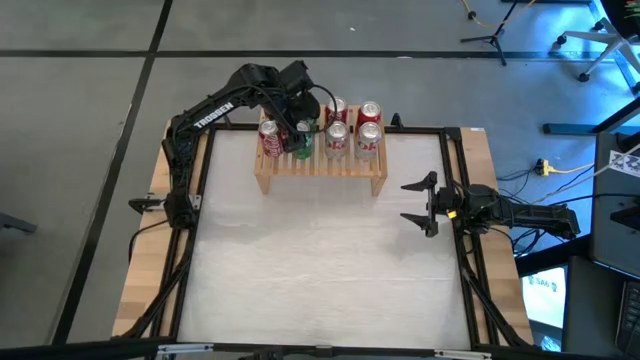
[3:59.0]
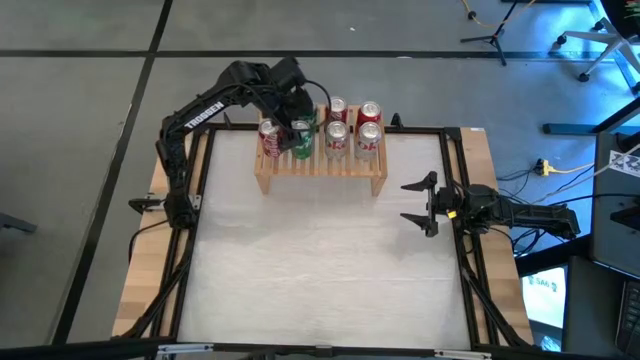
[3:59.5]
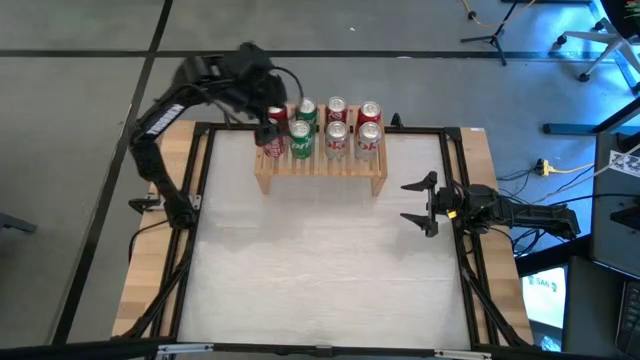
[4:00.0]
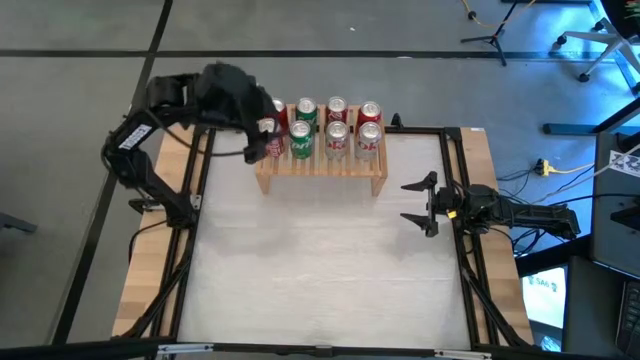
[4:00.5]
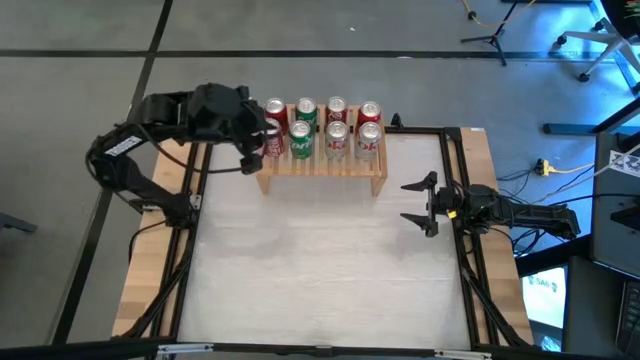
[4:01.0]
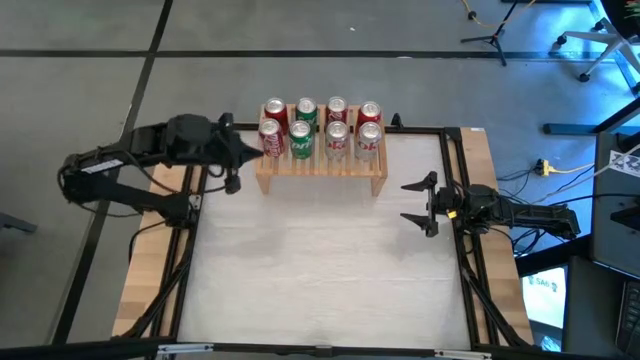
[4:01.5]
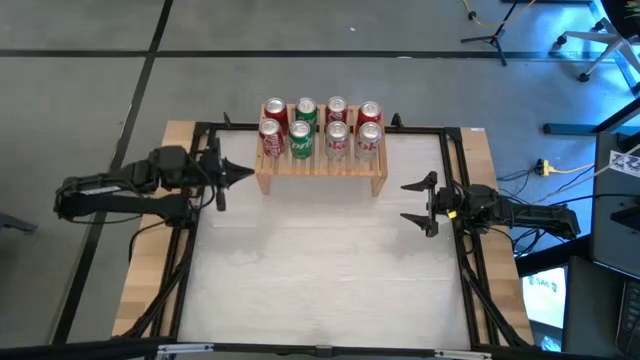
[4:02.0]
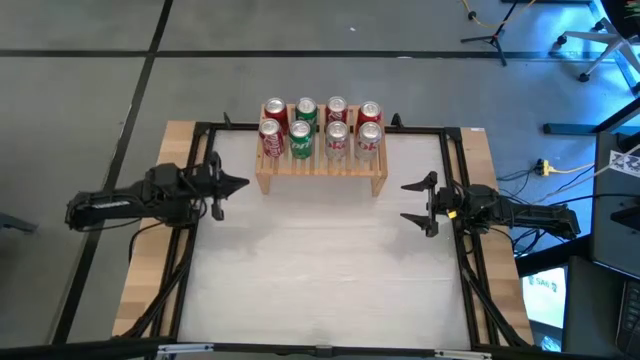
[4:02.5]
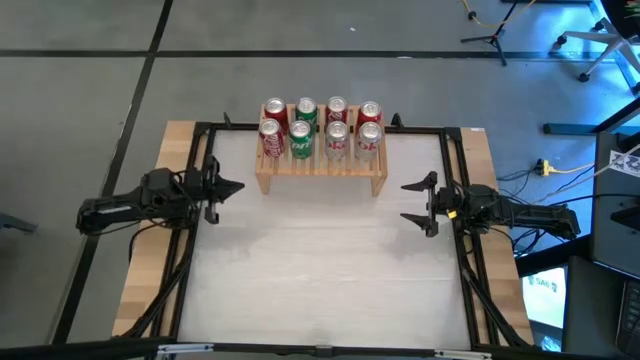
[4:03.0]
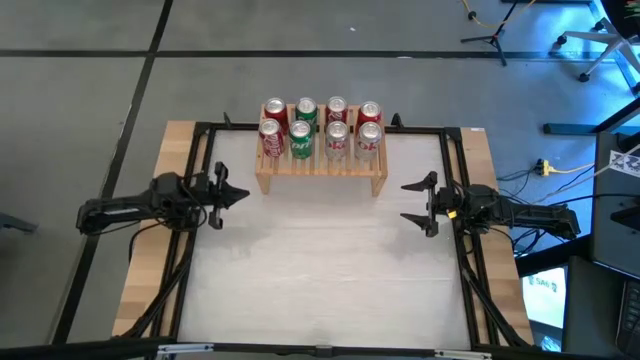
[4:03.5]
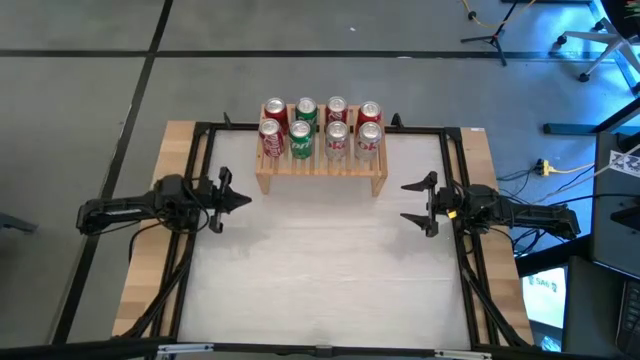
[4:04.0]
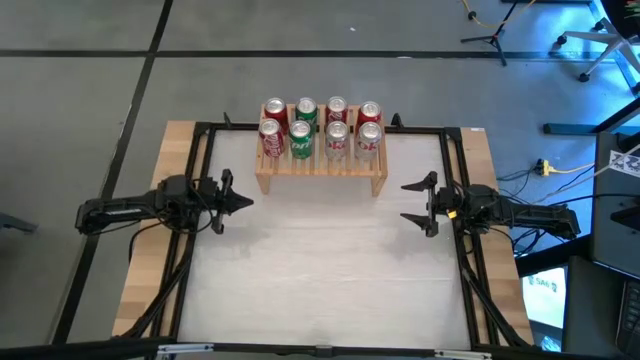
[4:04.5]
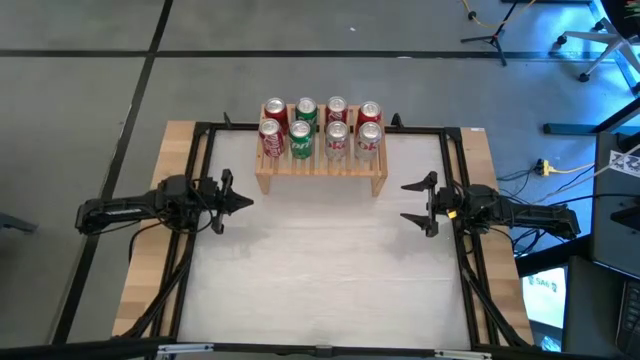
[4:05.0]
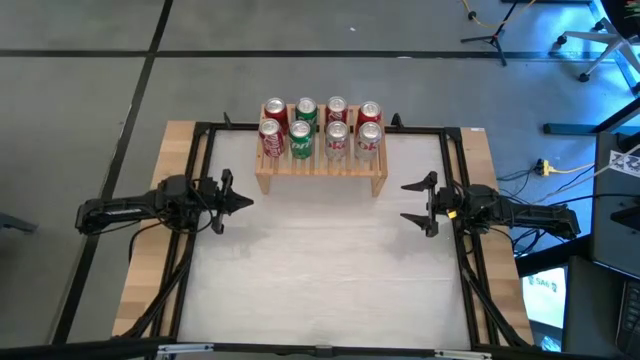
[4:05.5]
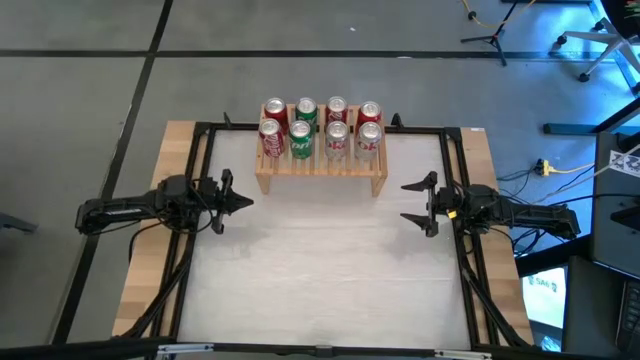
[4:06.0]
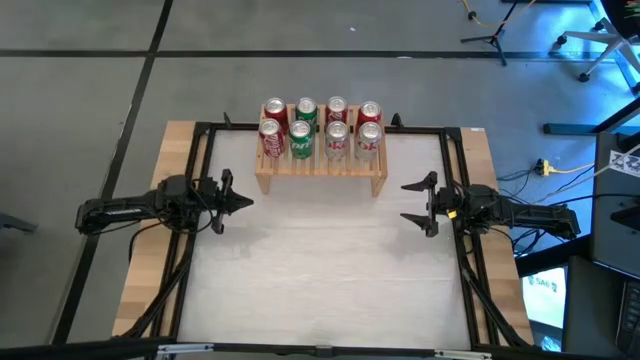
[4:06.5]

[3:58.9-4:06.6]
Task: Place canned beverage on shelf
Return to home Position

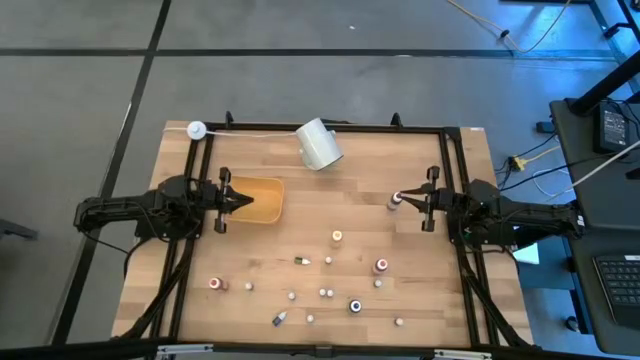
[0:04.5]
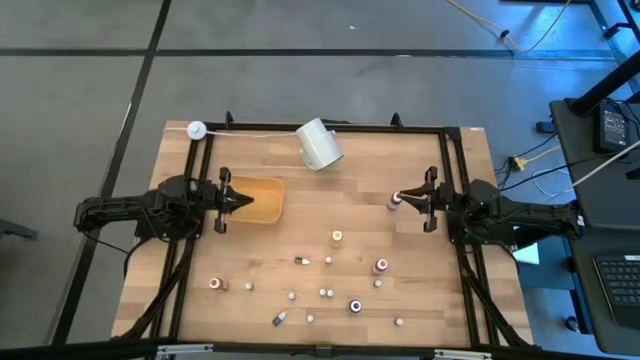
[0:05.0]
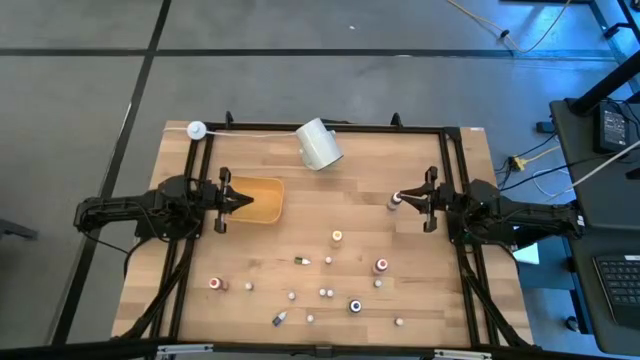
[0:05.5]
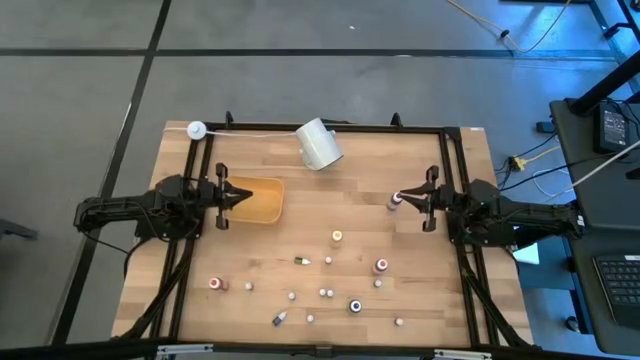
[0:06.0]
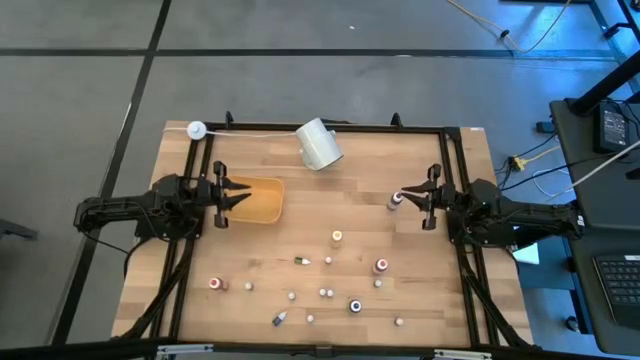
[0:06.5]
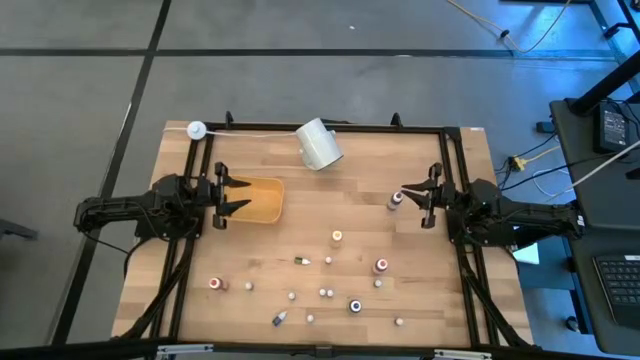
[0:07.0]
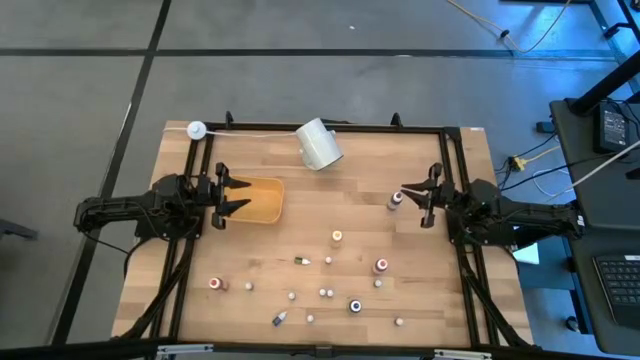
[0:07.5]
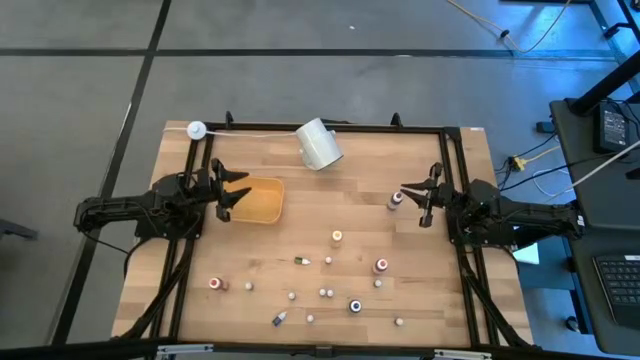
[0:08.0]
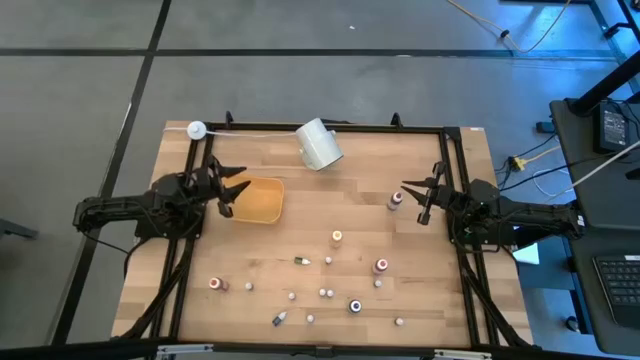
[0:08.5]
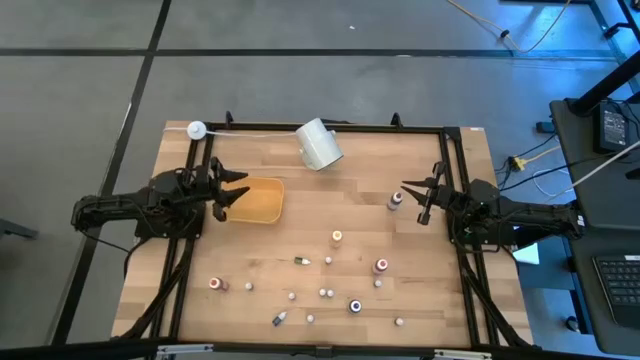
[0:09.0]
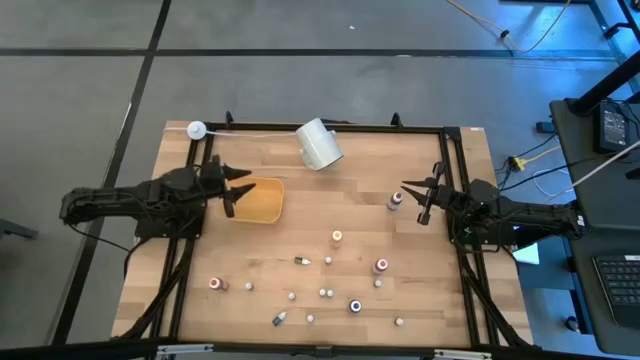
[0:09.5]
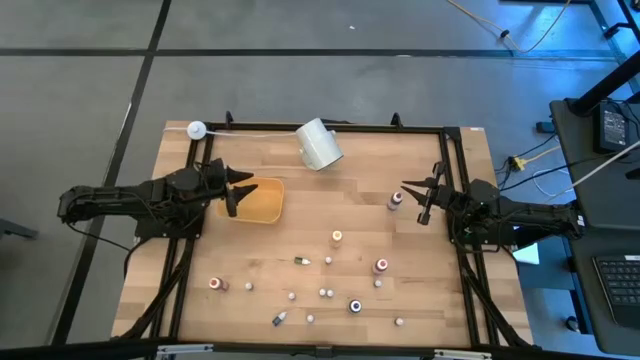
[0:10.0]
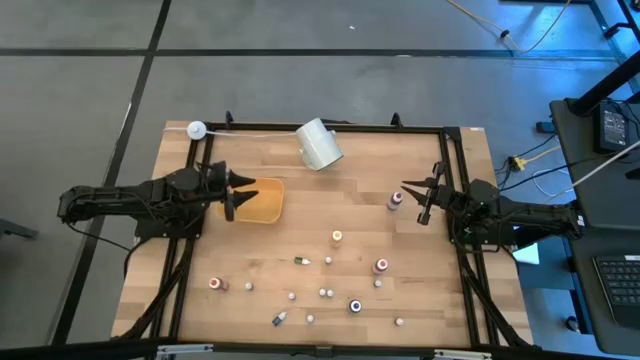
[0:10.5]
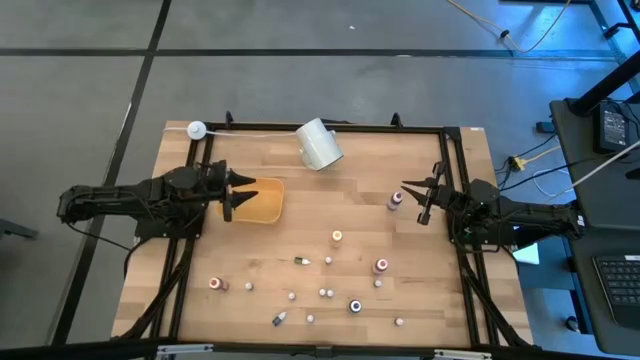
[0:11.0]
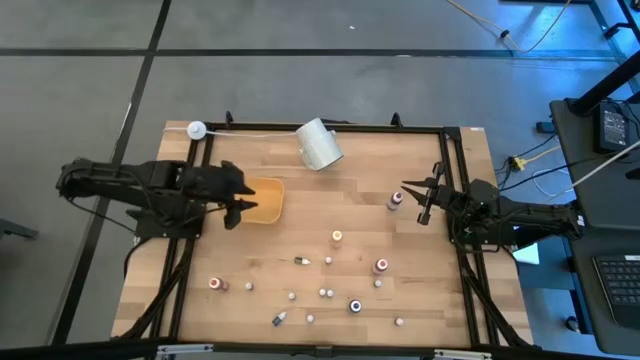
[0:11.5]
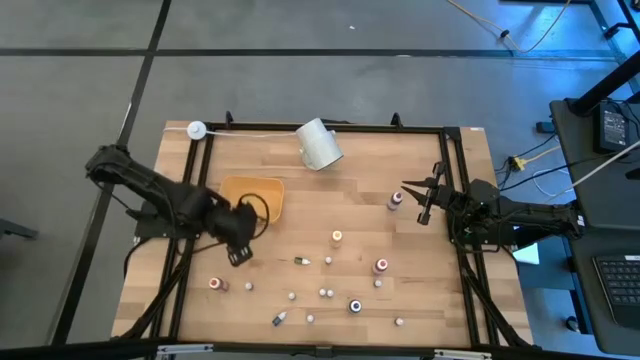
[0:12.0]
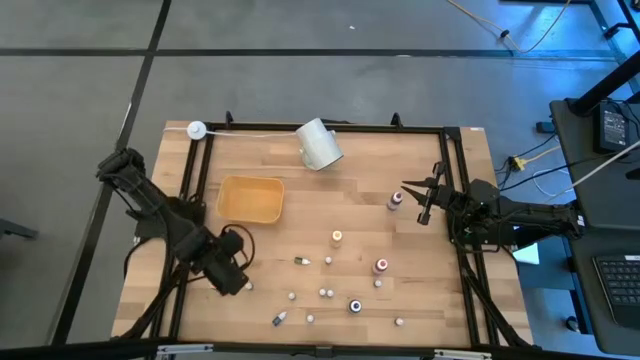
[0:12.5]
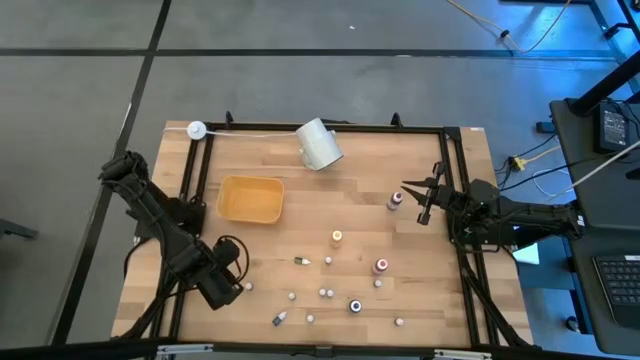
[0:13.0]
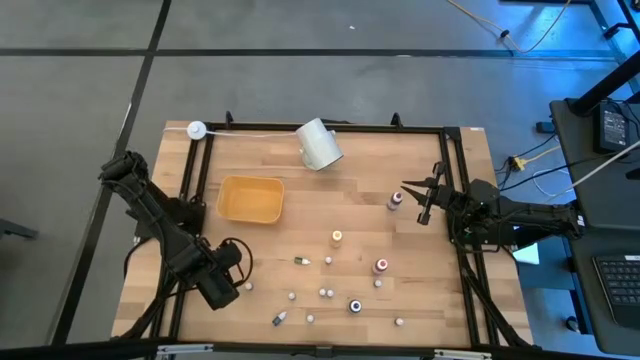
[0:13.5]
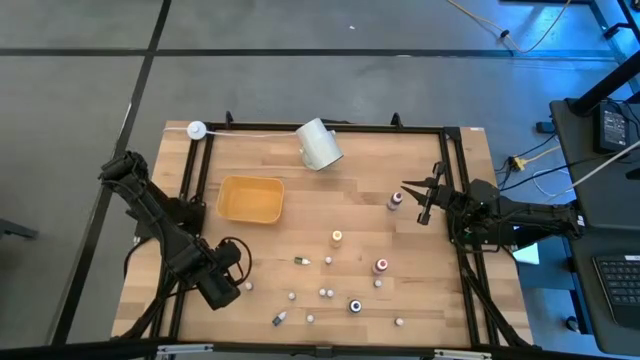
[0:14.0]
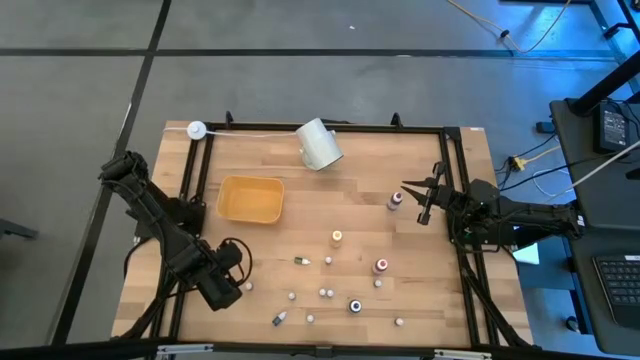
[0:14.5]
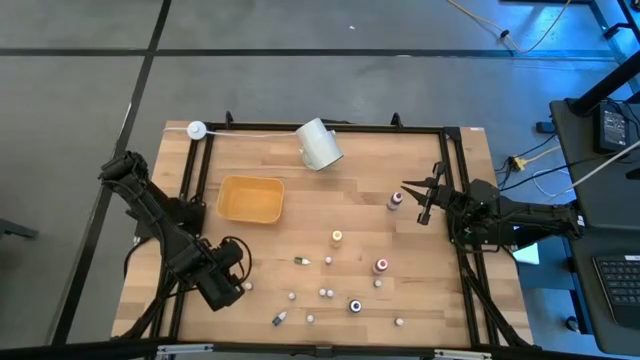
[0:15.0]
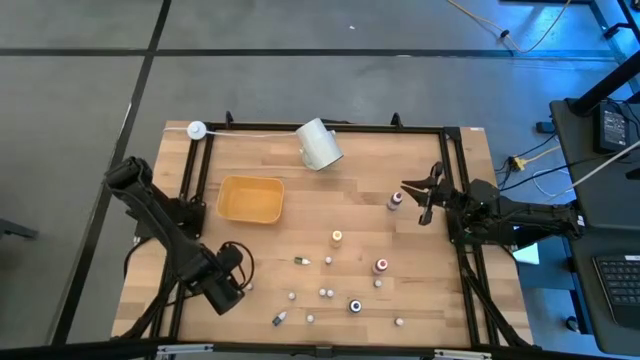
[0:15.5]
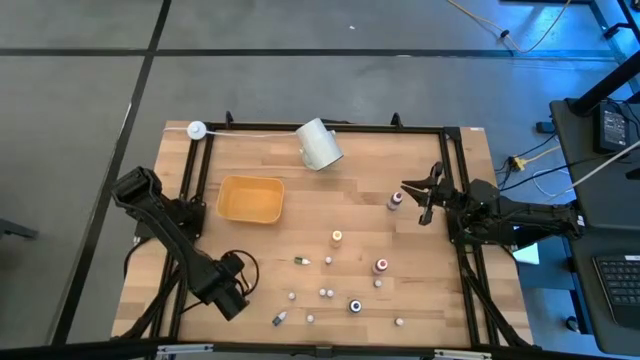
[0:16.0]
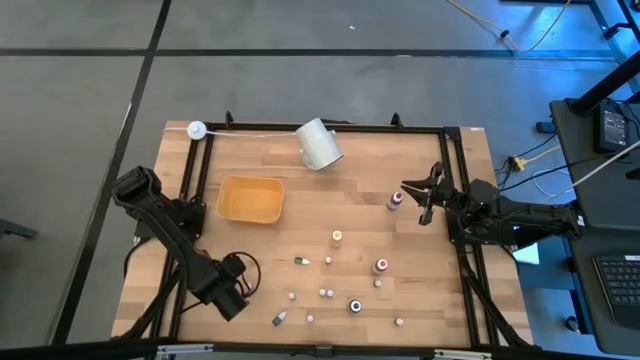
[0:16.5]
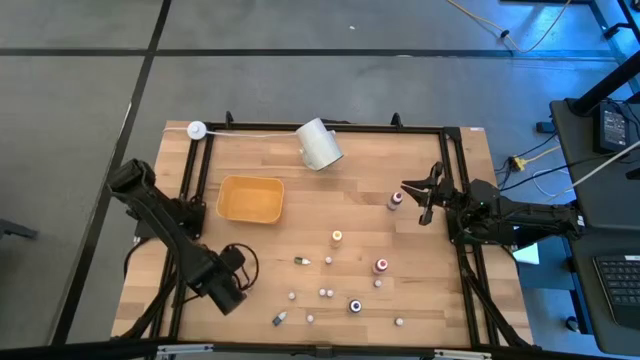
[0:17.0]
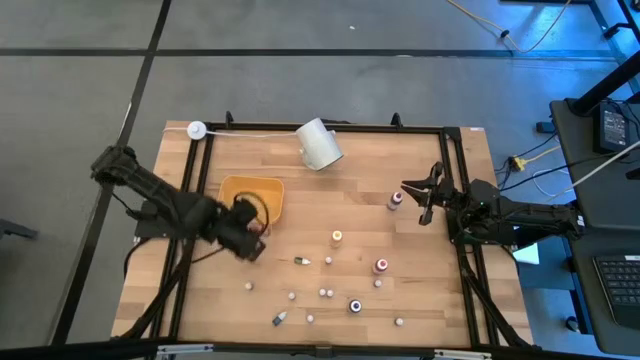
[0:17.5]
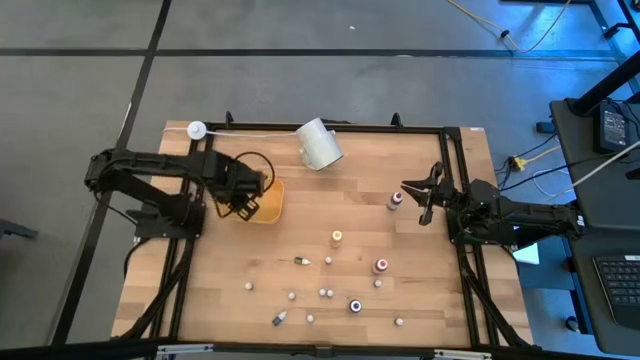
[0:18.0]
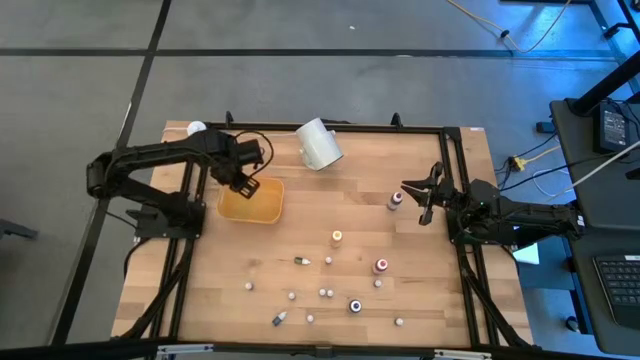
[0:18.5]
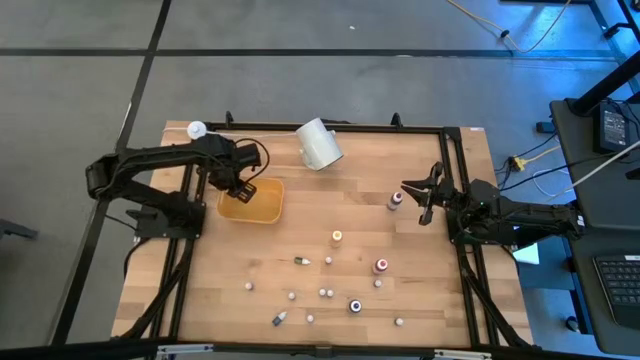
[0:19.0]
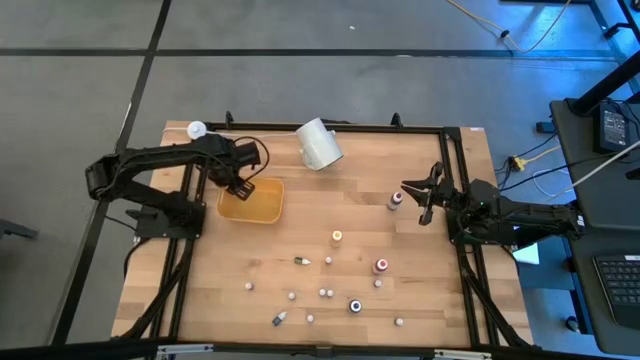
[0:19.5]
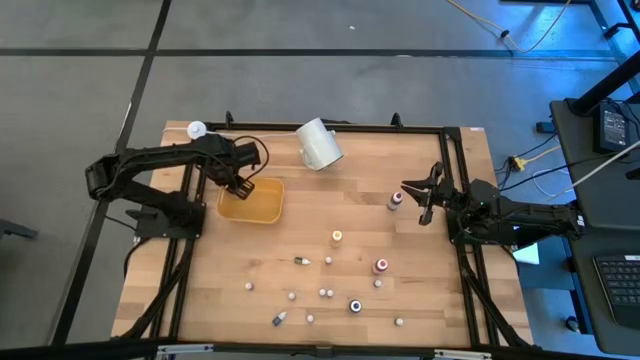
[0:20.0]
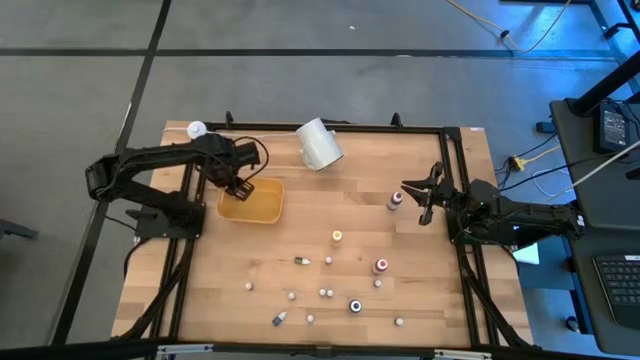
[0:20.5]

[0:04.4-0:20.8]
Task: Pick & Place food coloring
Put the large orange food coloring bottle into the bin
